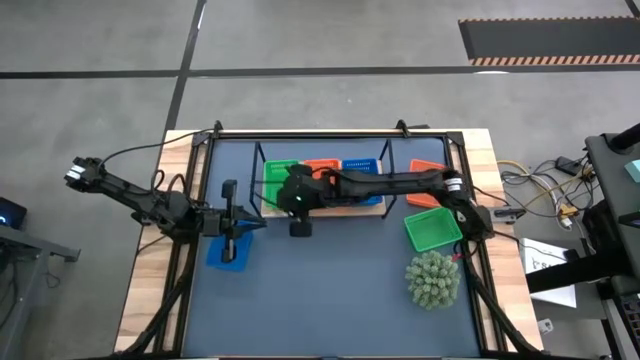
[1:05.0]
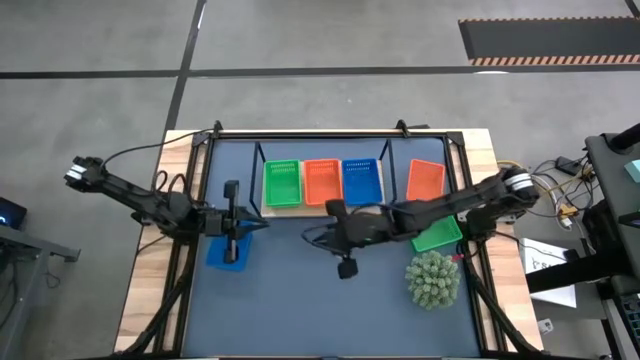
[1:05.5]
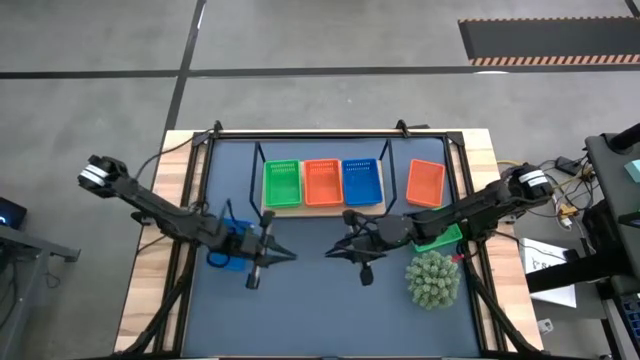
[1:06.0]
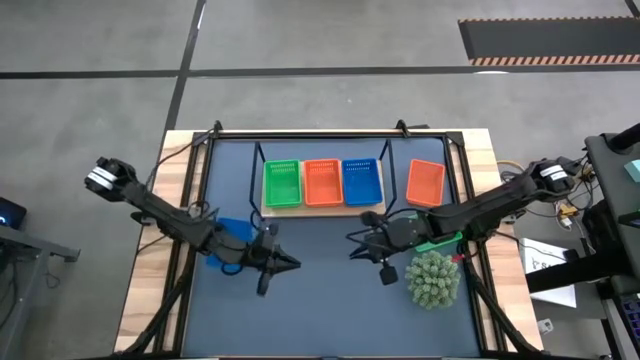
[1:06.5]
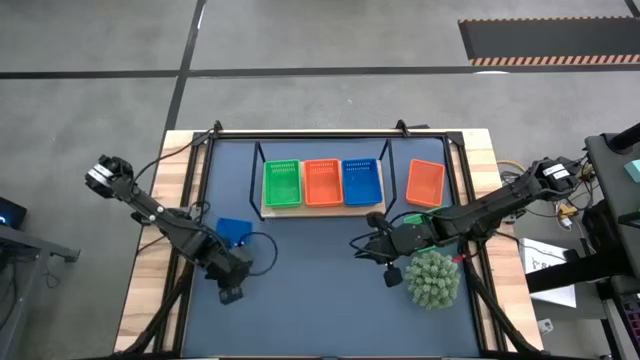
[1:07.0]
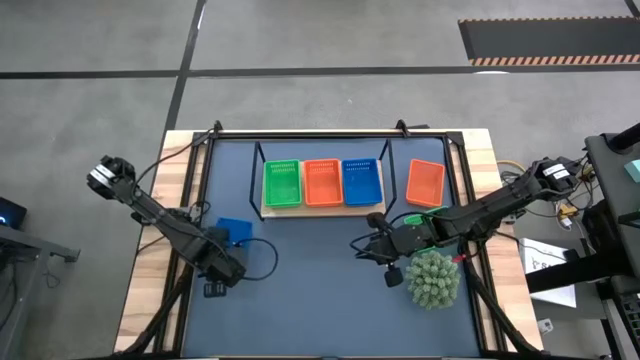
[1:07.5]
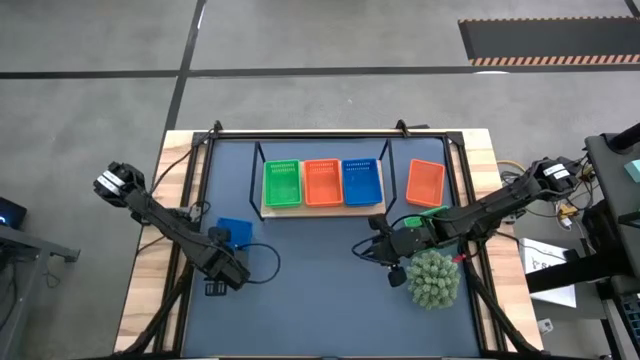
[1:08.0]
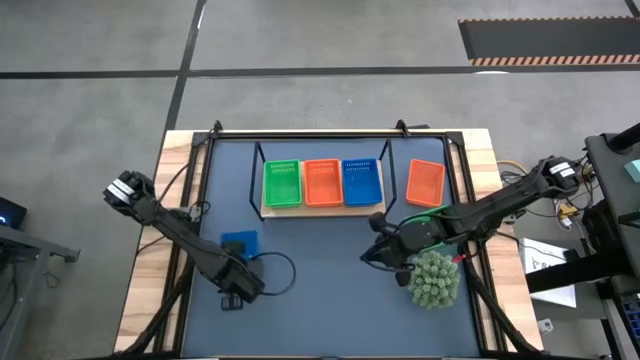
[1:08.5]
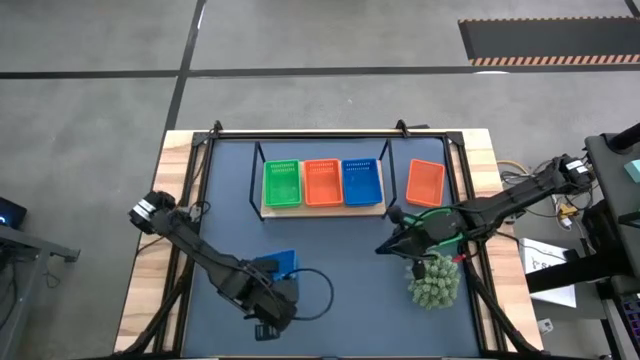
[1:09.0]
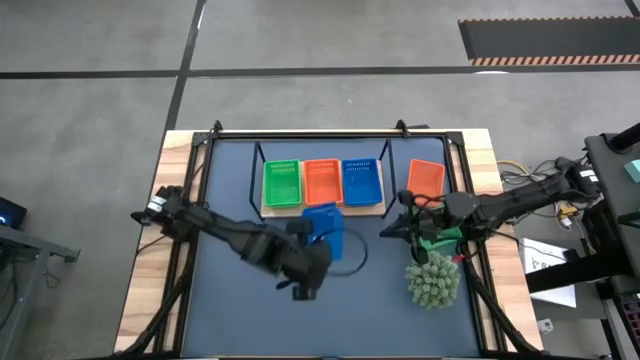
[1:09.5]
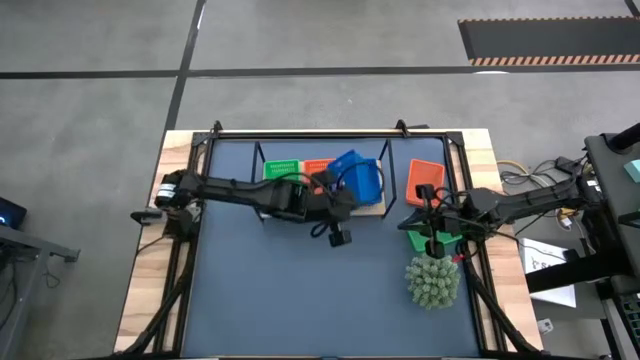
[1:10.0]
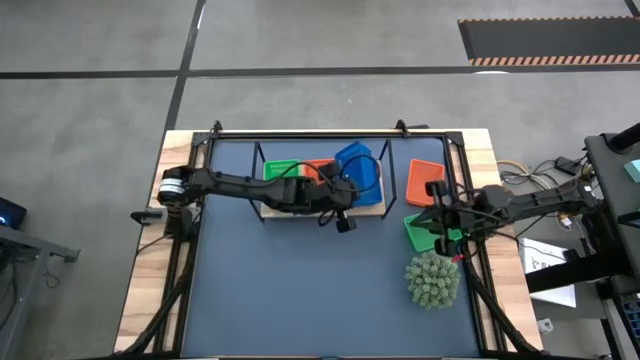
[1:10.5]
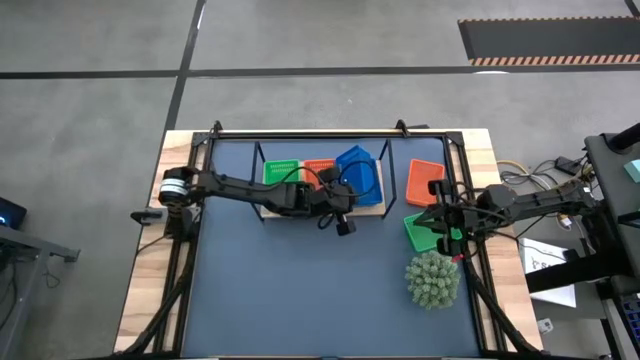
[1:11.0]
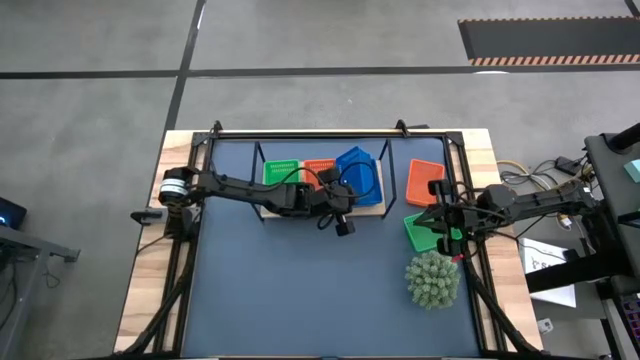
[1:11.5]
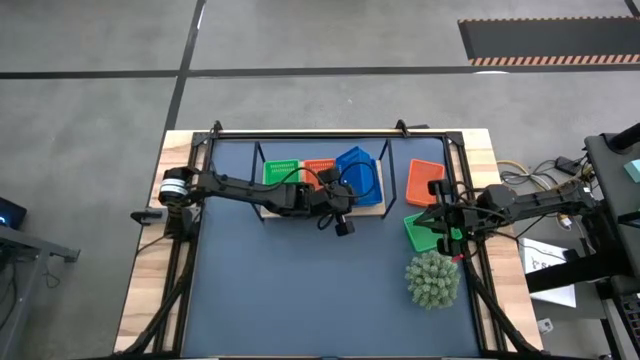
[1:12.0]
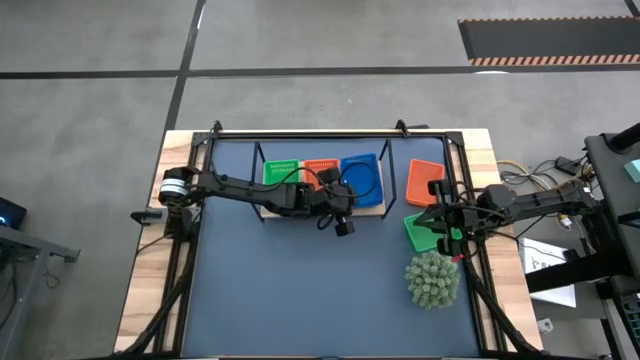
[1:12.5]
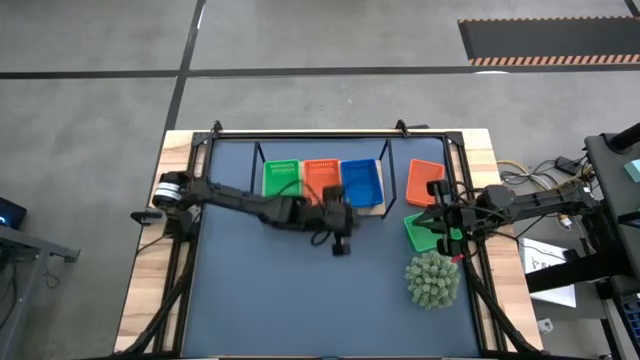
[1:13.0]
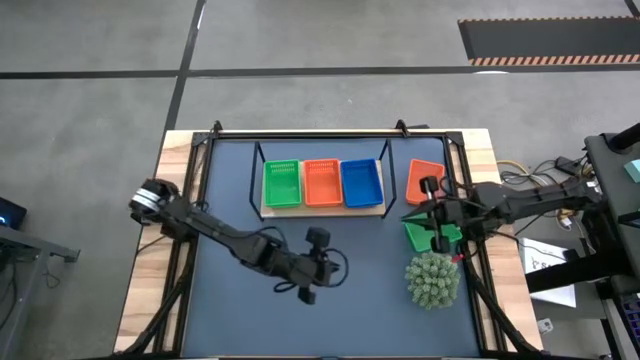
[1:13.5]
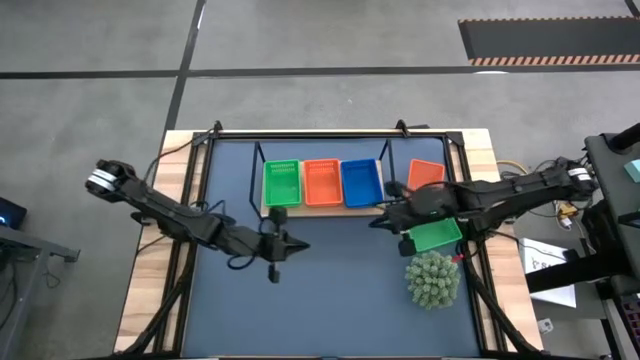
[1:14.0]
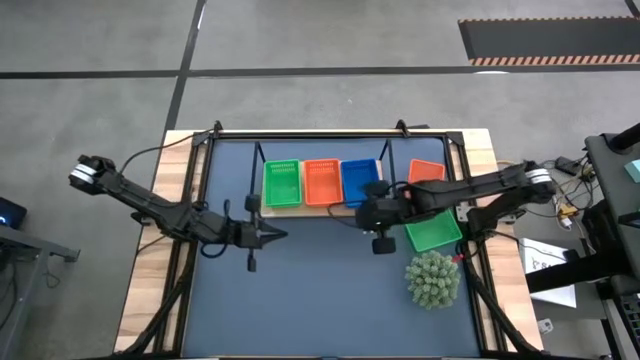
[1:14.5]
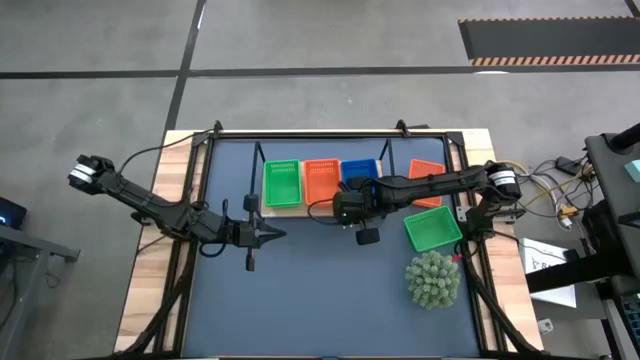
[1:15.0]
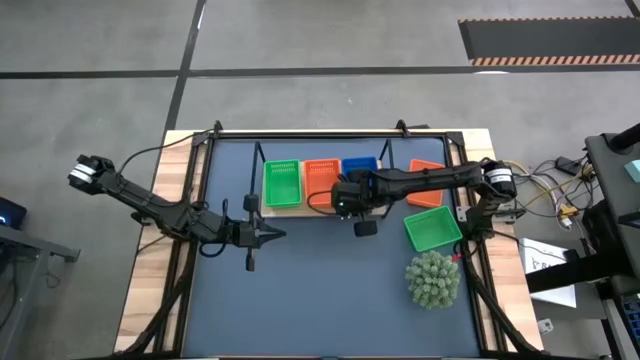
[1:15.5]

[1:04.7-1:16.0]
Task: Stack baskets on shelf by color
Stack the blue basket on top of the blue basket on the shelf

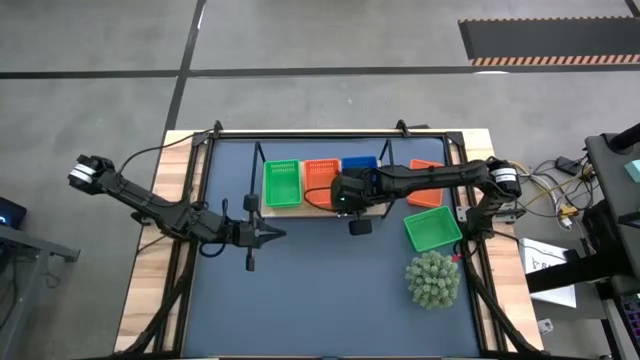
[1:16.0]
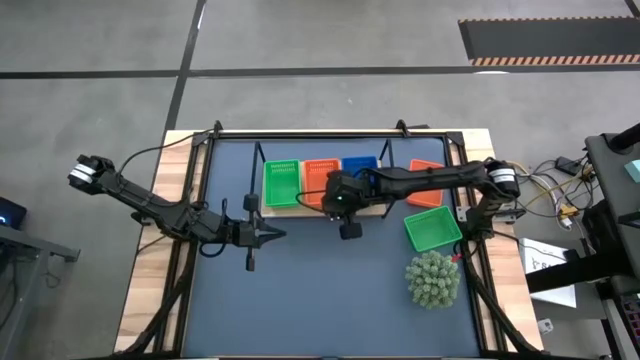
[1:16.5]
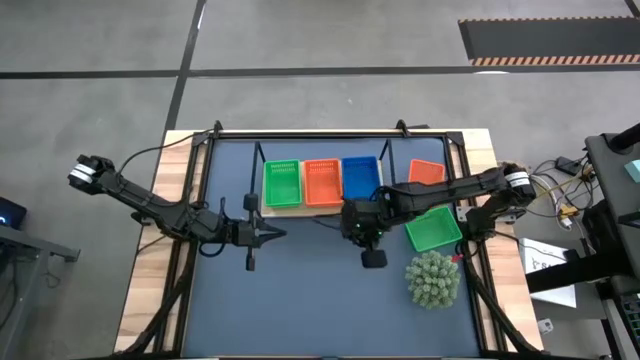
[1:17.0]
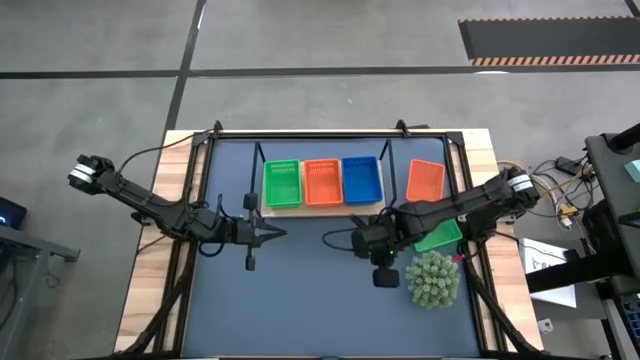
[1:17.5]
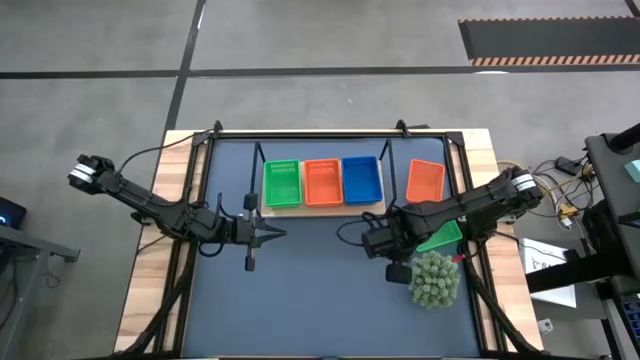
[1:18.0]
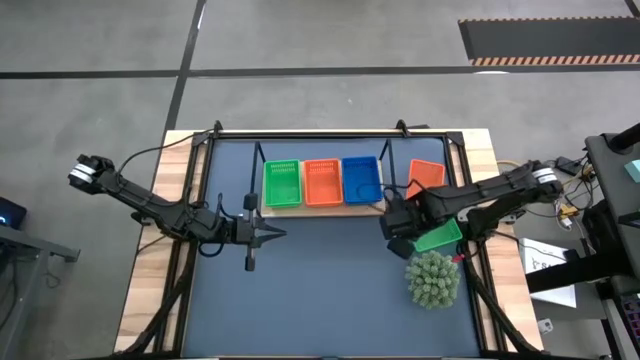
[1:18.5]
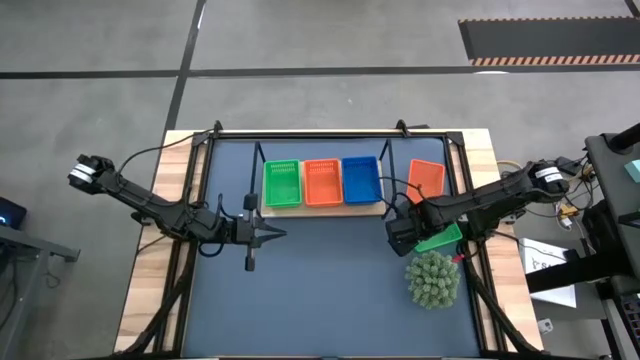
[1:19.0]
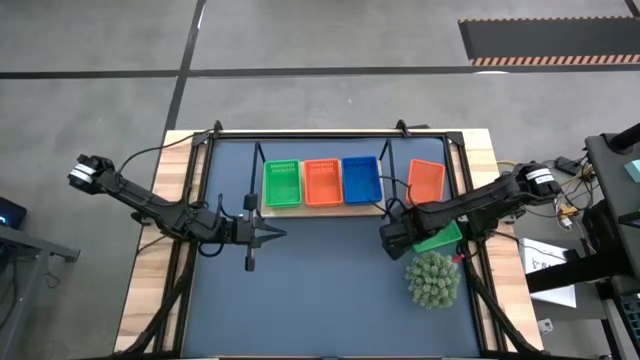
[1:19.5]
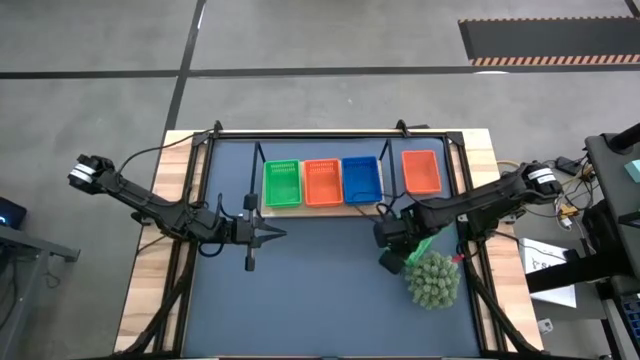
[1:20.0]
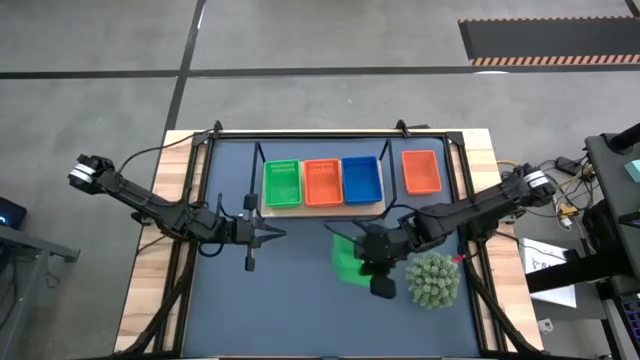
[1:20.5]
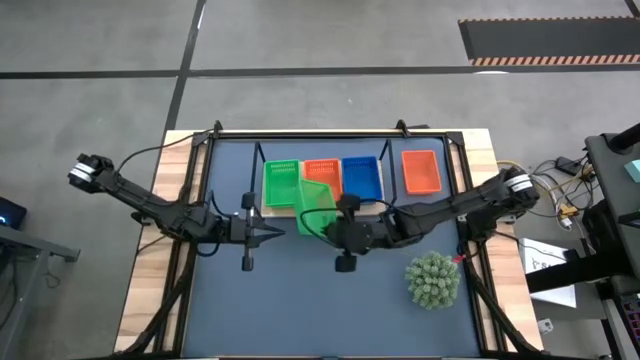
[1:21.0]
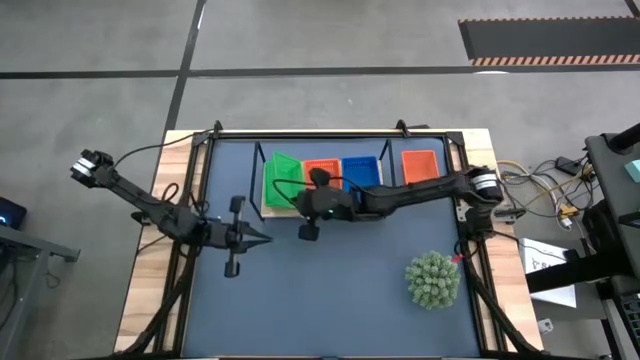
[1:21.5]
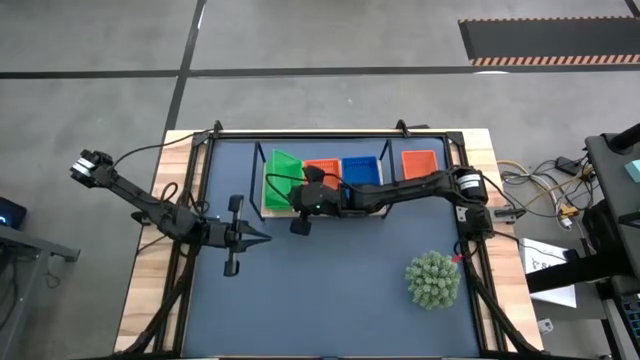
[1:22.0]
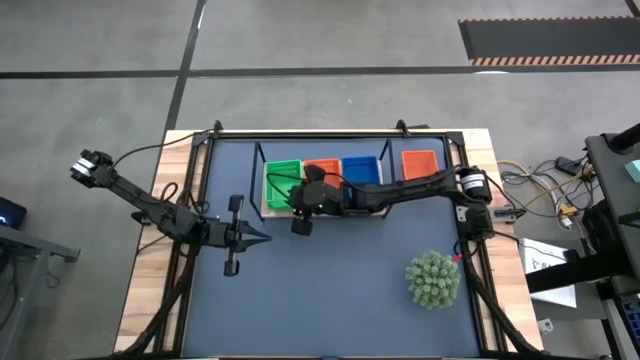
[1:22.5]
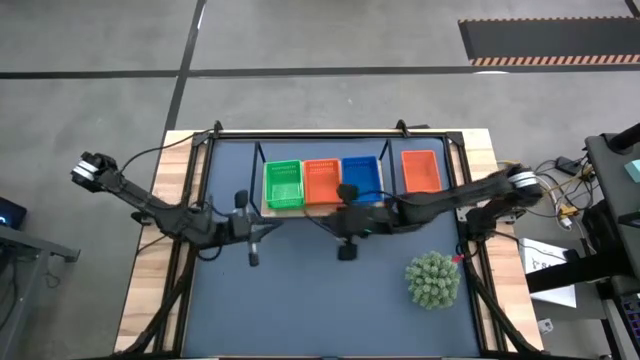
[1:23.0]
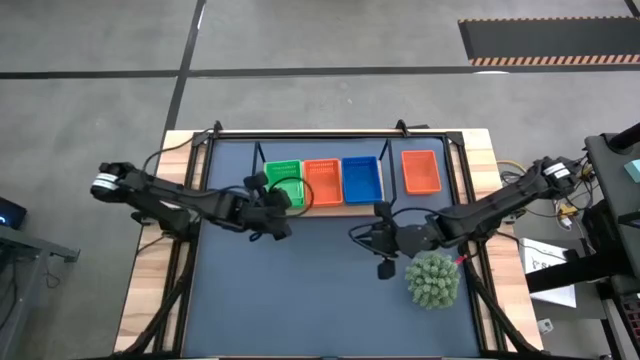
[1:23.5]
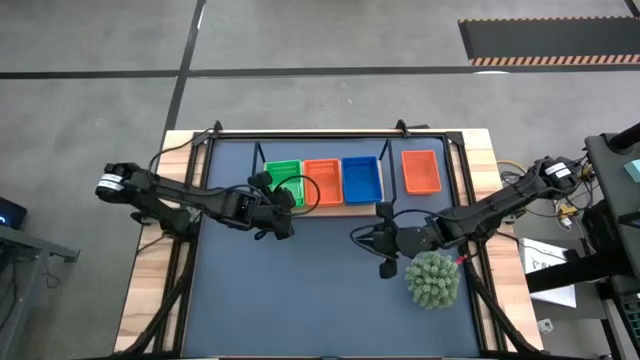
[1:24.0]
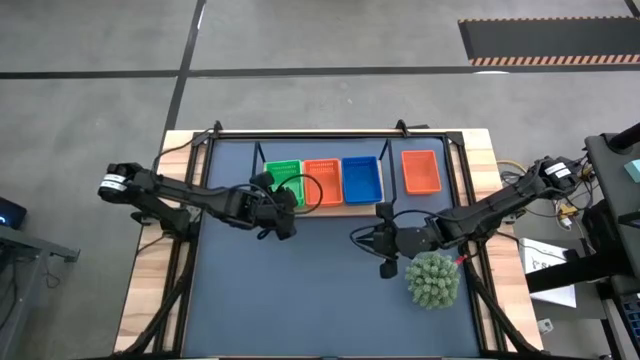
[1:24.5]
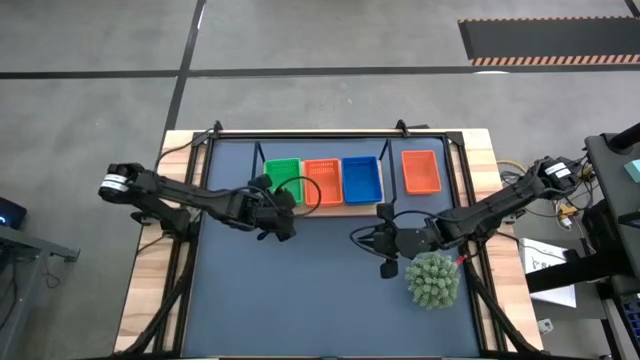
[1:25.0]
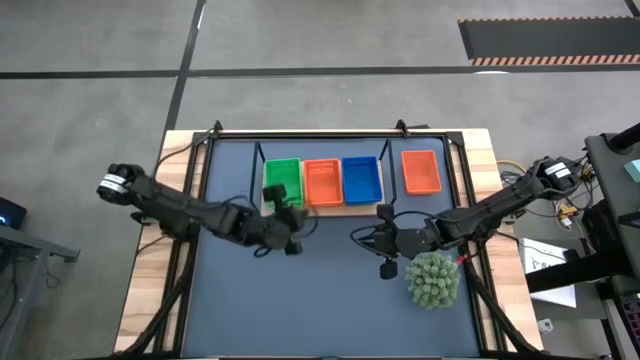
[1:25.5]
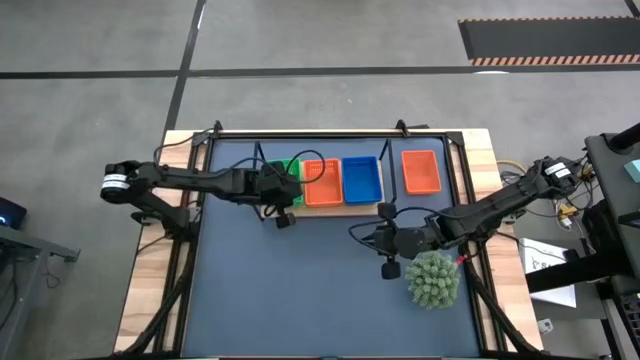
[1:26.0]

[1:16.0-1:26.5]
Stack the green basket on top of the green basket on the shelf
